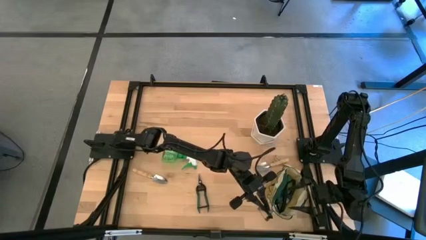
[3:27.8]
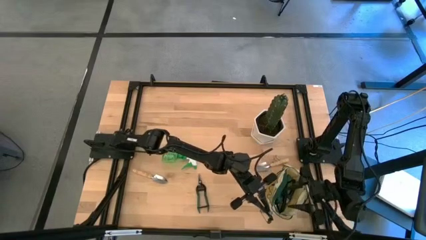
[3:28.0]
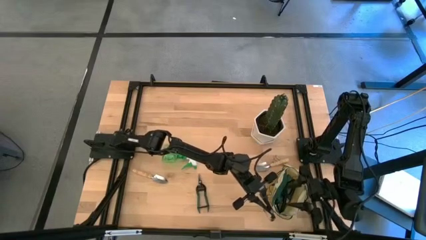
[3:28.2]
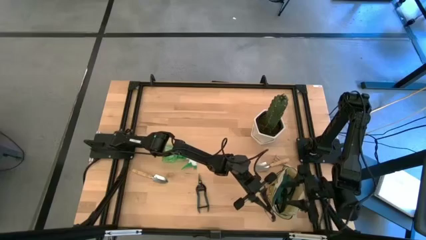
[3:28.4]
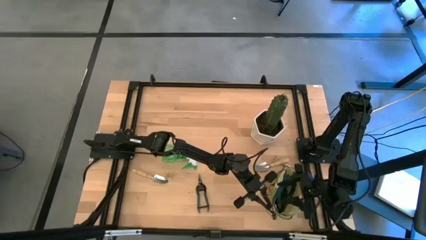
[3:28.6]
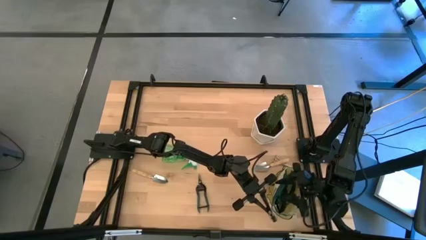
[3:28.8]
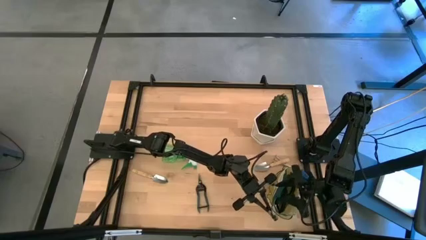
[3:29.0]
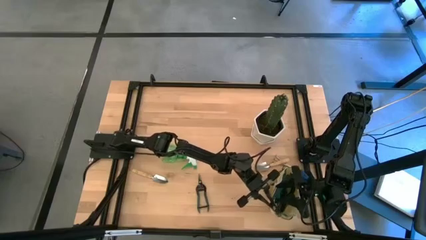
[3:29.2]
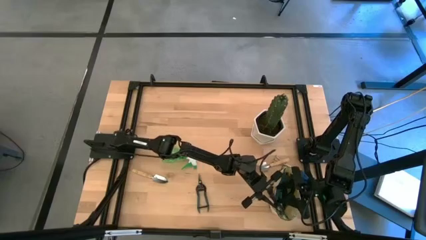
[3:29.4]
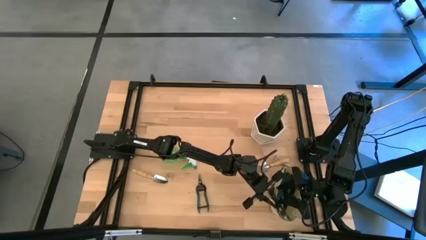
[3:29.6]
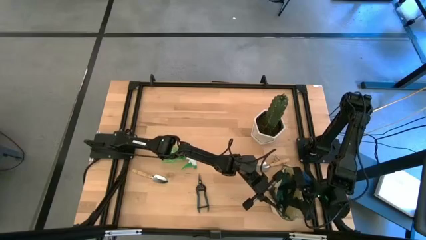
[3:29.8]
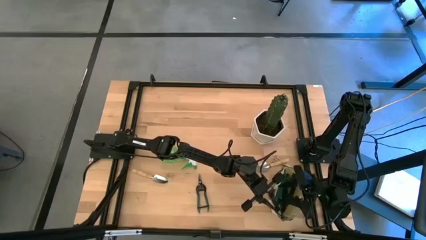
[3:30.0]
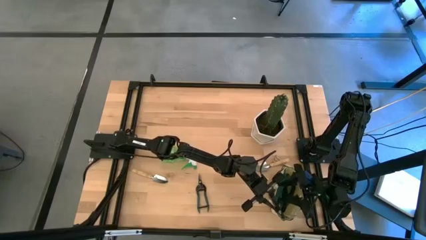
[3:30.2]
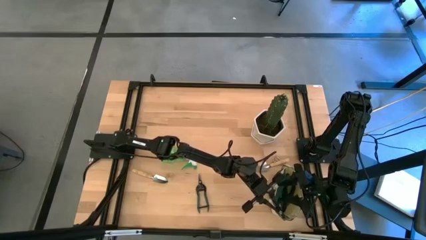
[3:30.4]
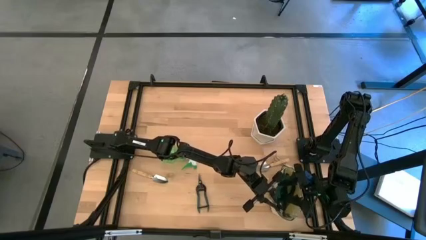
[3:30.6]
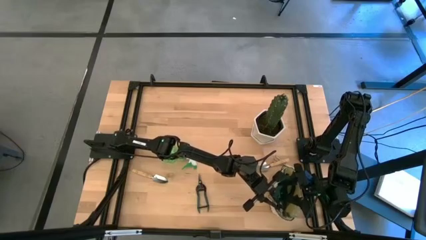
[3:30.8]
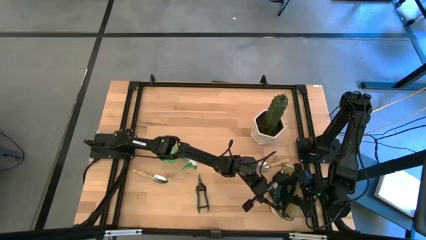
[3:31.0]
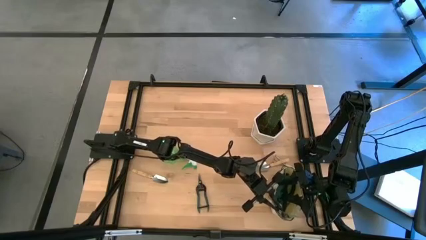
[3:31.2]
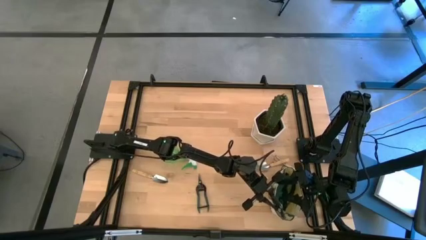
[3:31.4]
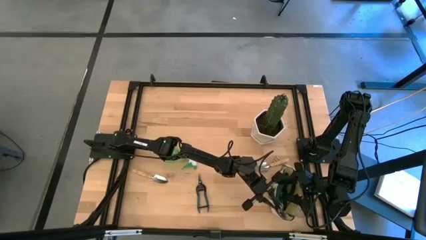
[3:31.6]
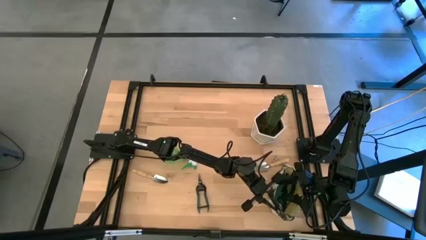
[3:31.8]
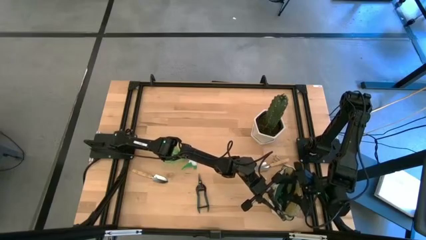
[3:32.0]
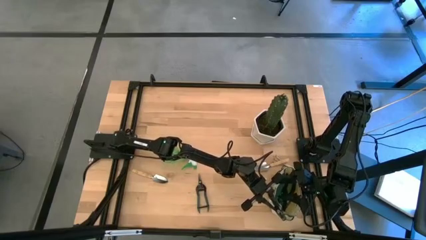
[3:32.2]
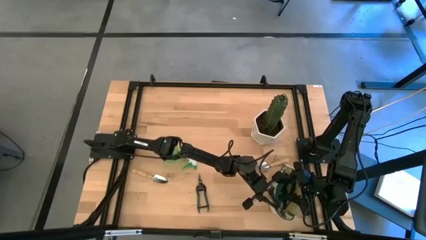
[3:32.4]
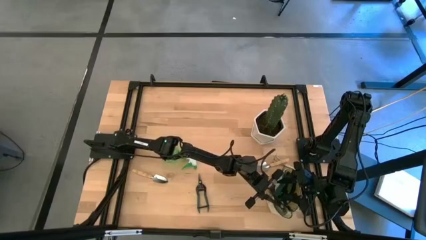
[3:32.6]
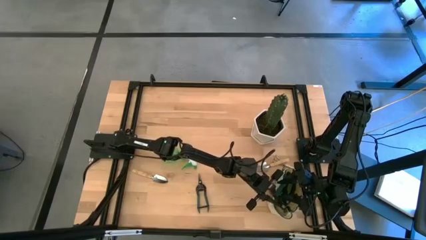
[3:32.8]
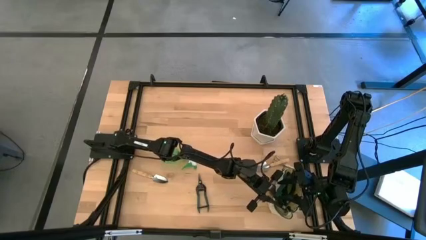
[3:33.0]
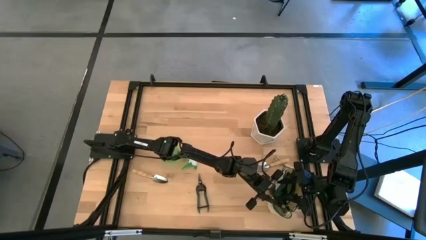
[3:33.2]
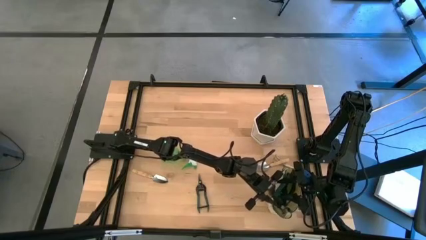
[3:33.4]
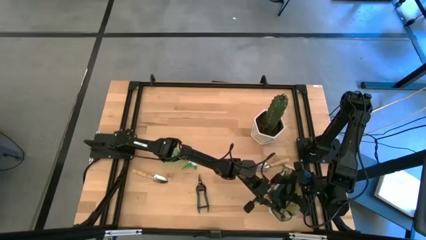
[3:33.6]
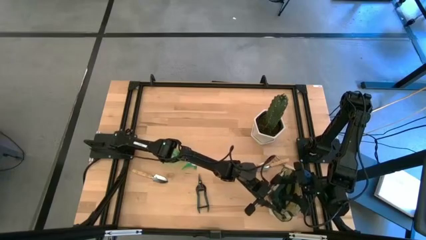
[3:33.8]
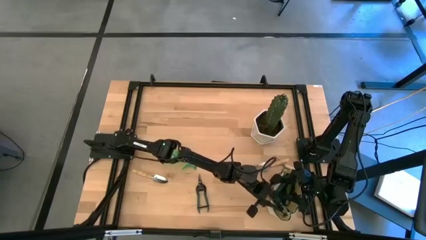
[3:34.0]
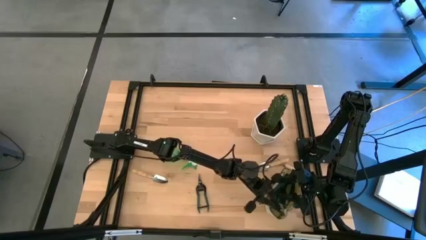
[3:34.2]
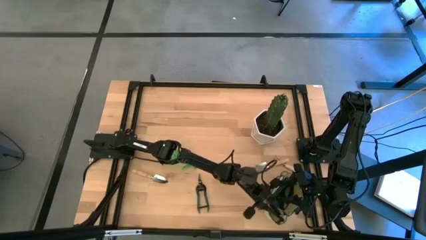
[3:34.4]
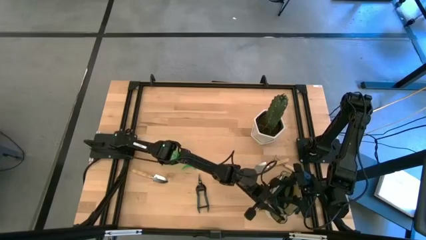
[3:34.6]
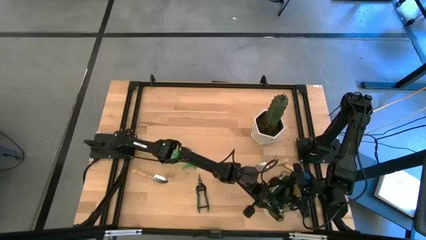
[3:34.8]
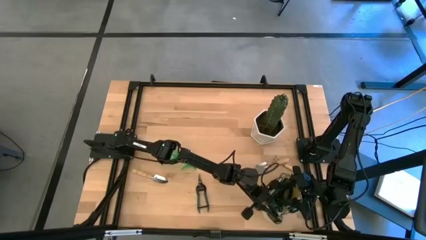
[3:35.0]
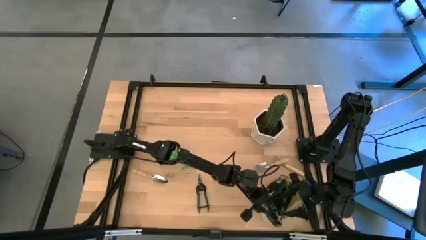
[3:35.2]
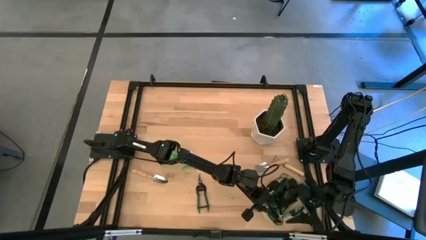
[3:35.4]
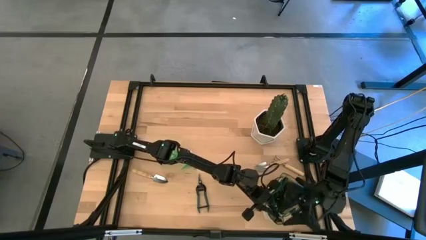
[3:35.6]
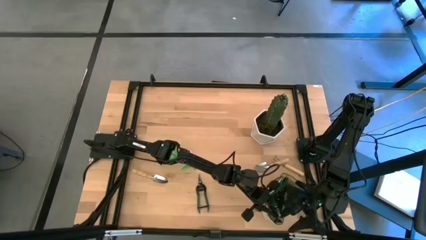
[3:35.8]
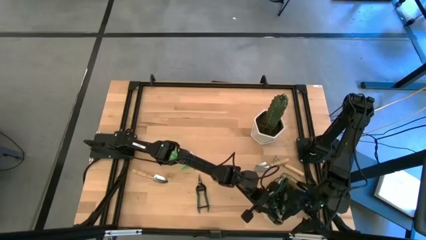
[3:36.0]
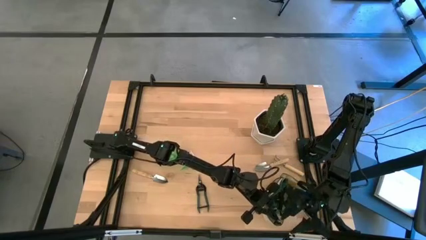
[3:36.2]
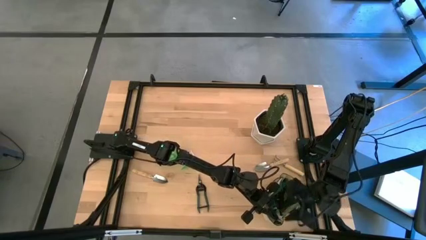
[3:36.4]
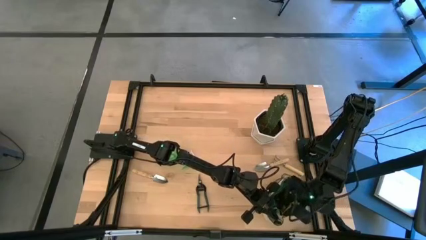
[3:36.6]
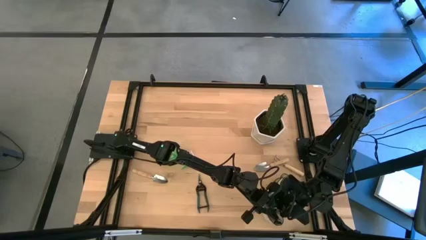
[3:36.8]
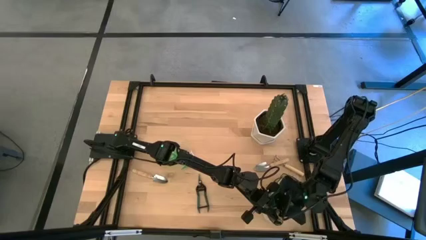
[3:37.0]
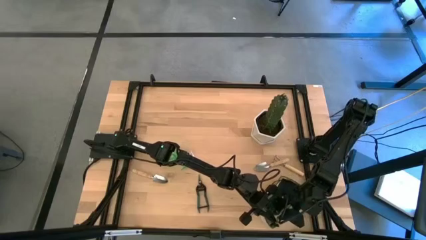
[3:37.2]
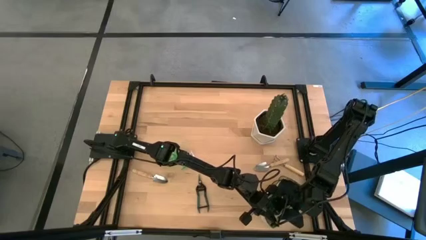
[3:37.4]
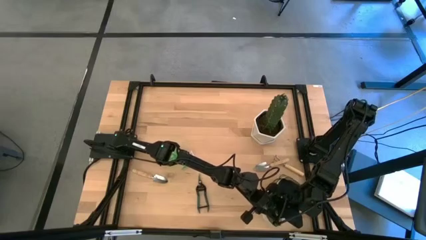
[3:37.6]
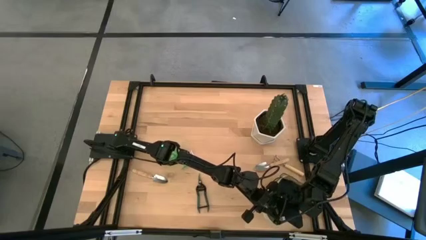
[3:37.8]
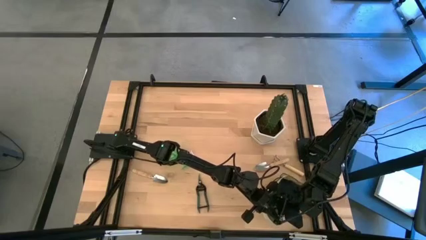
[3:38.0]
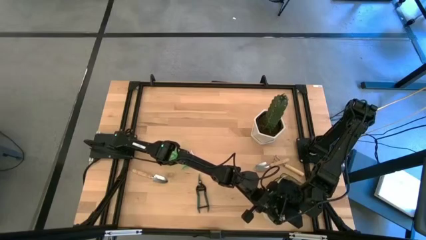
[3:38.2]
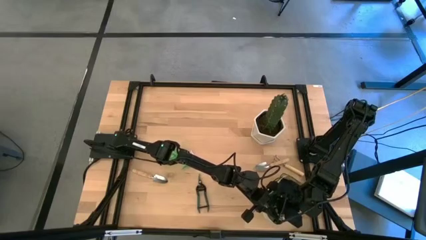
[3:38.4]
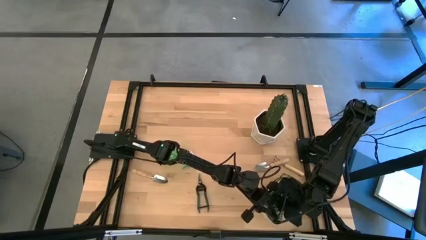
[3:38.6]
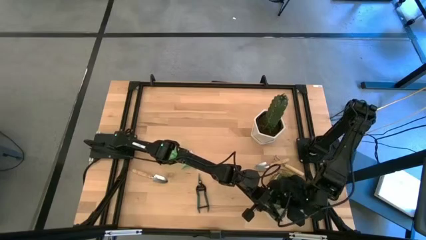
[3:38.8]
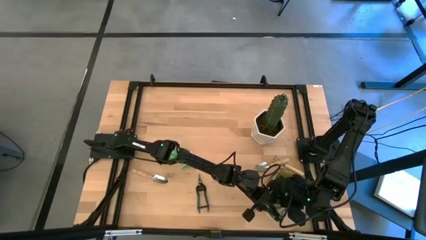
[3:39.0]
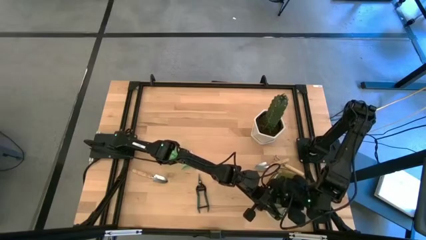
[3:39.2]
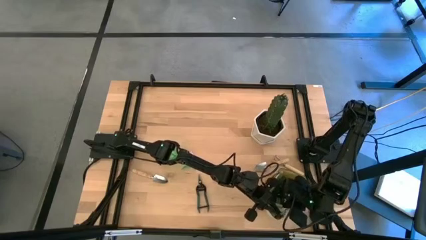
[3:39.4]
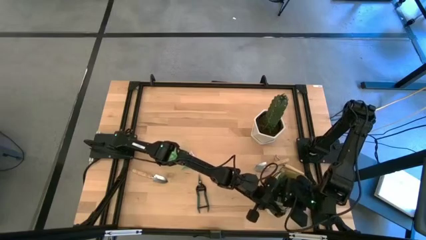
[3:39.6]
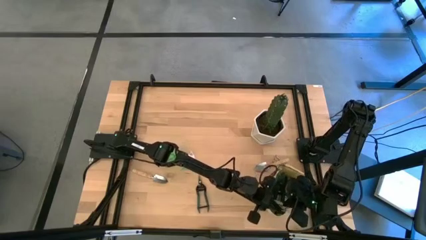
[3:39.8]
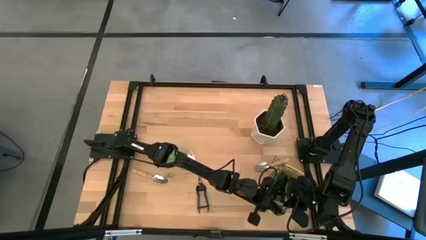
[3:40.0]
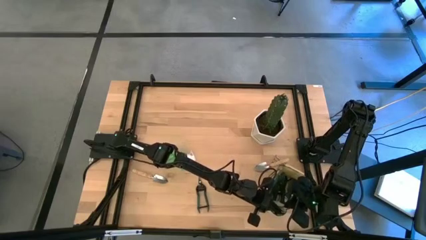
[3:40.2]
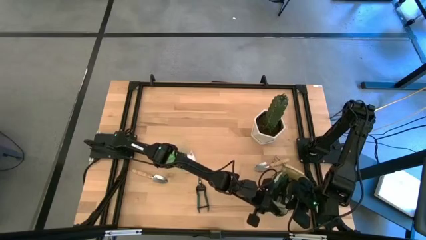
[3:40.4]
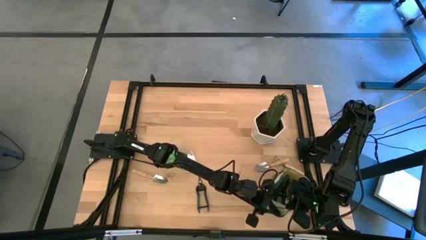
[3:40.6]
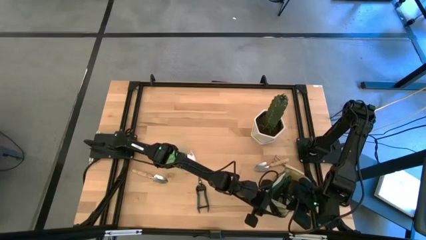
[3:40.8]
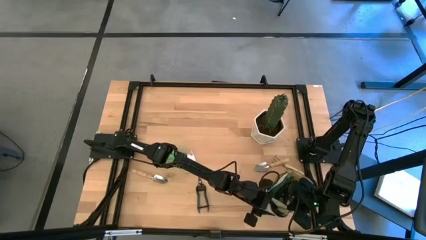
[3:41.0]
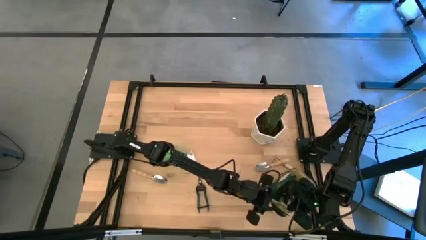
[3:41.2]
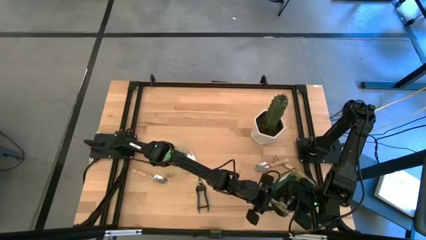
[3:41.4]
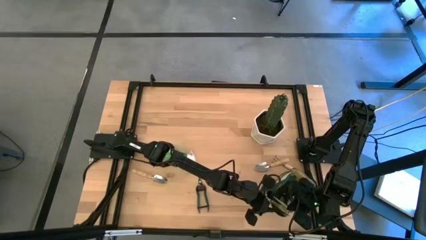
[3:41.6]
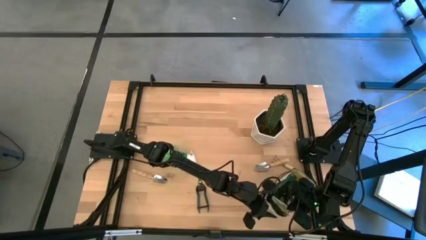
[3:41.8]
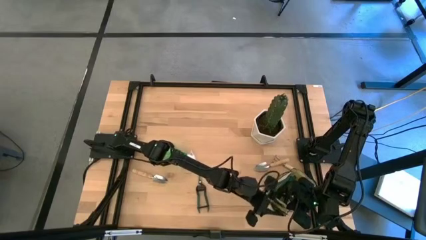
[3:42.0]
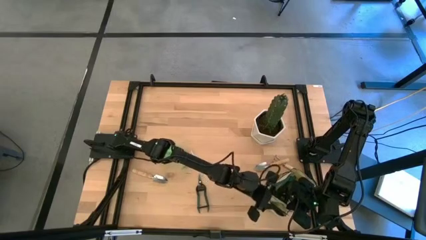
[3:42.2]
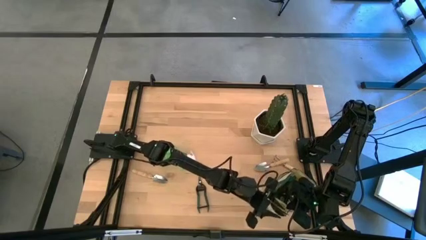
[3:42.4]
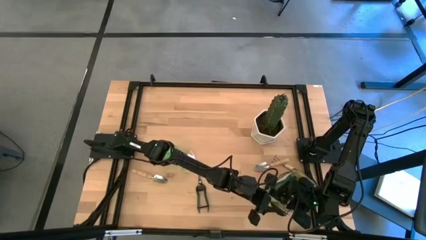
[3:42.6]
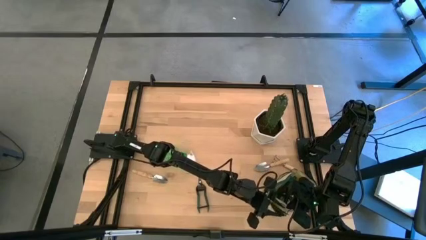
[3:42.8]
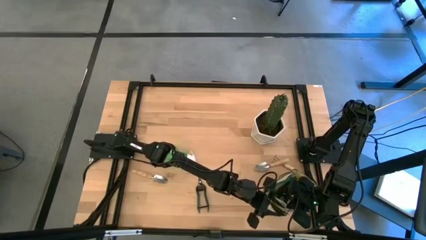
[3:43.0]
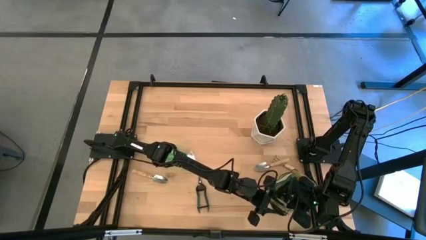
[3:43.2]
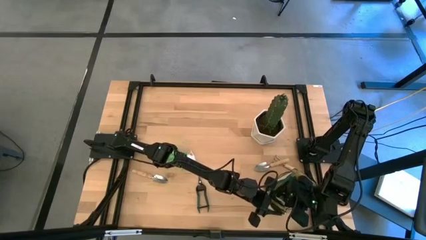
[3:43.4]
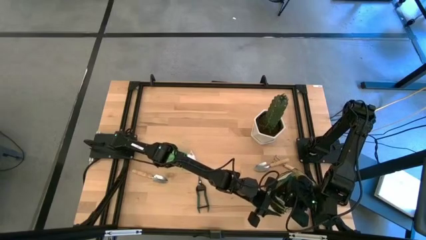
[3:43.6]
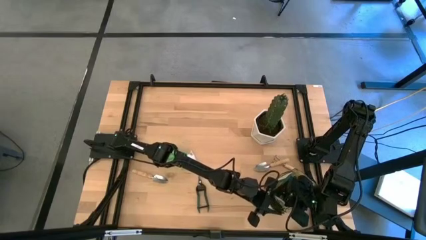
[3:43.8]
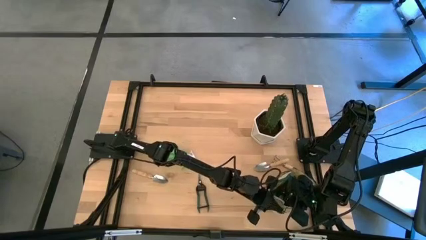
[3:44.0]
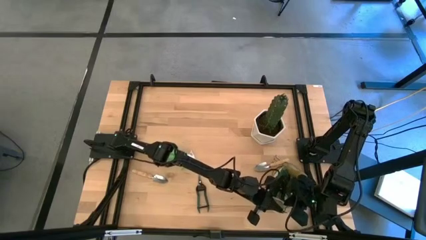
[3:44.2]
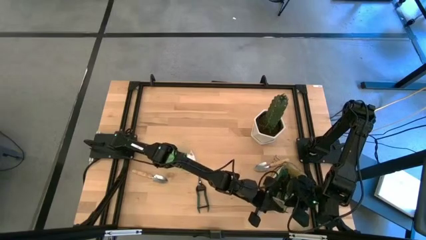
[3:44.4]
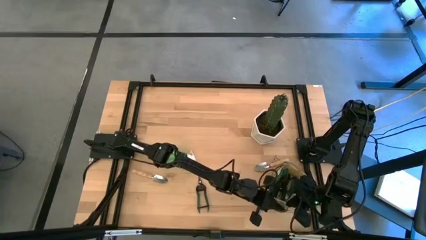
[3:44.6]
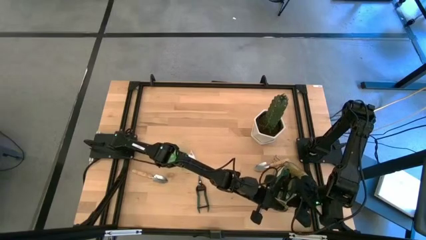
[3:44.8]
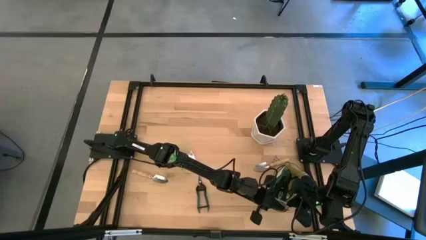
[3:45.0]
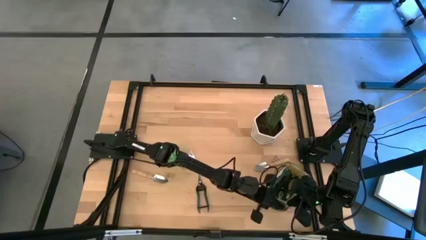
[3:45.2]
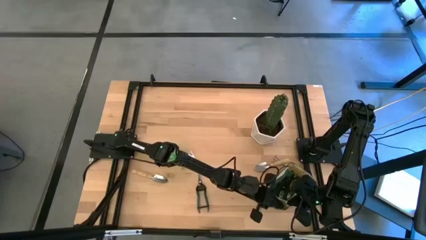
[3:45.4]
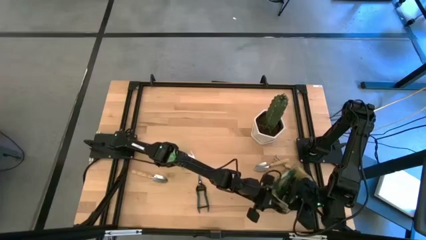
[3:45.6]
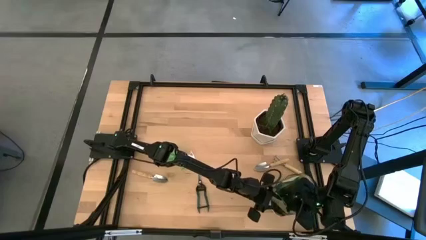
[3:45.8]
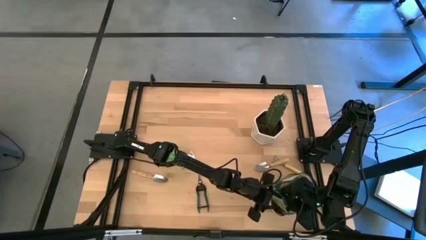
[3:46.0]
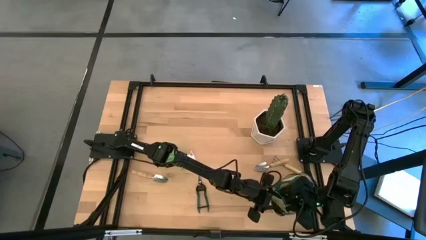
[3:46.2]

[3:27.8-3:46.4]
Task: Pick & Place Garden tools in Gardening bag
Put the top grafting pruner into the side pocket of the white bag
